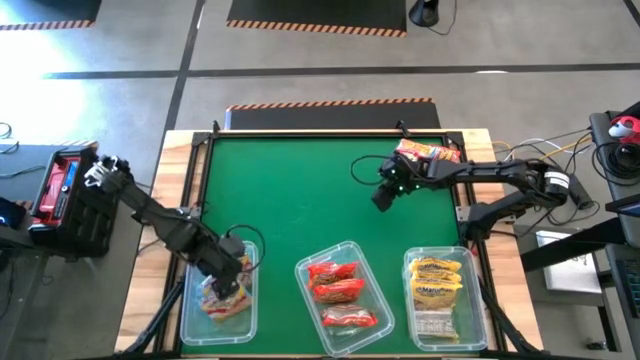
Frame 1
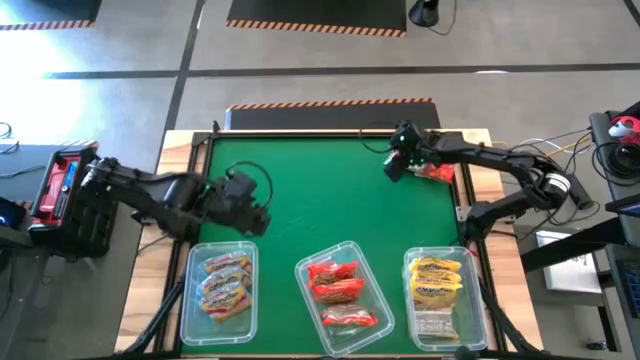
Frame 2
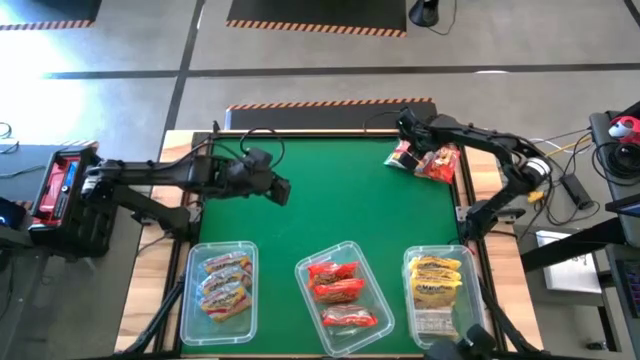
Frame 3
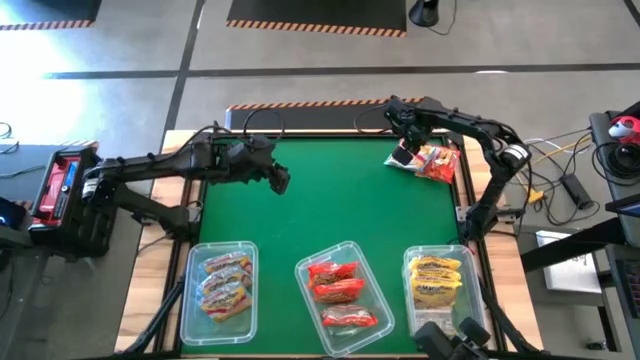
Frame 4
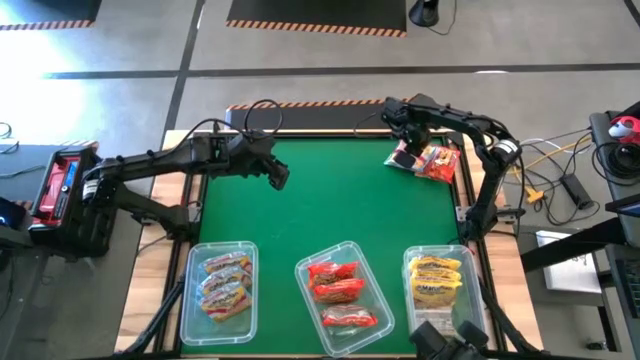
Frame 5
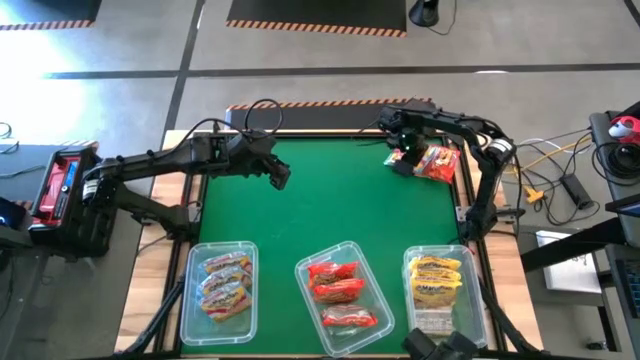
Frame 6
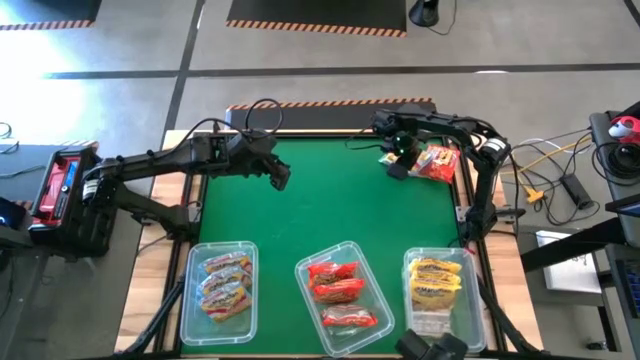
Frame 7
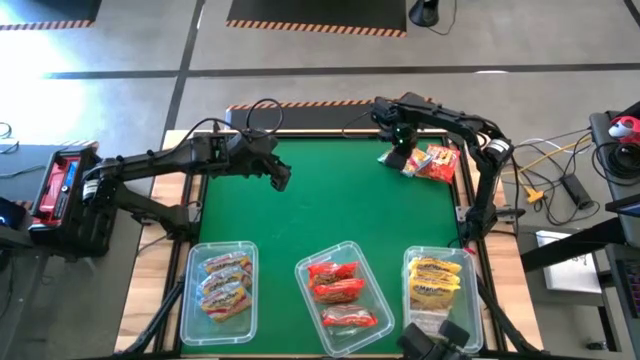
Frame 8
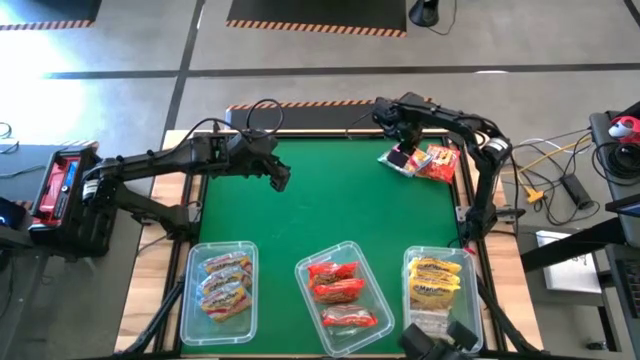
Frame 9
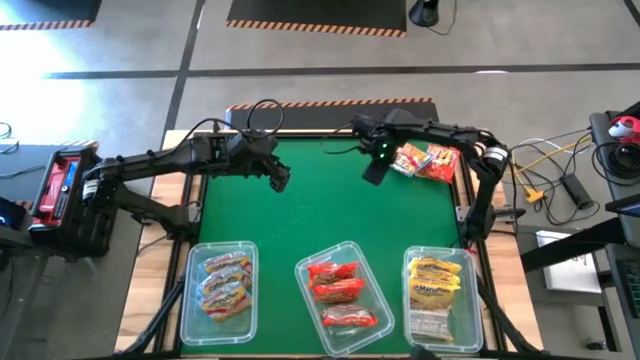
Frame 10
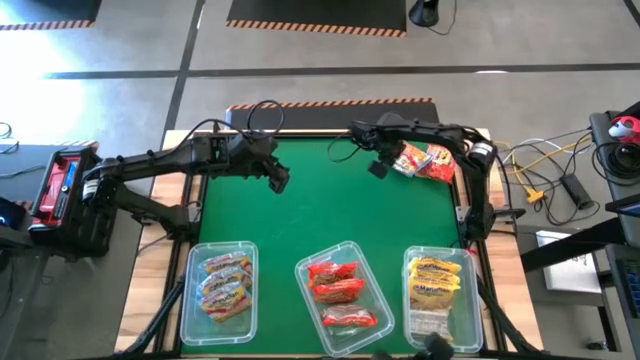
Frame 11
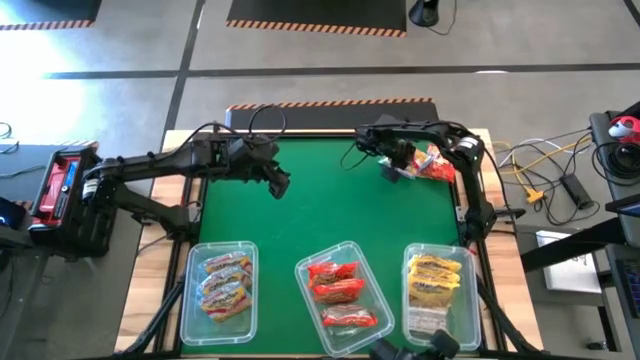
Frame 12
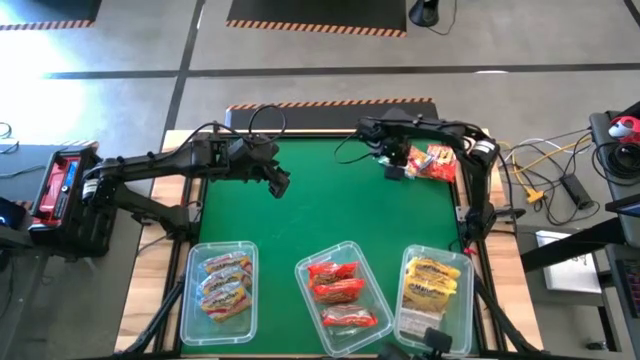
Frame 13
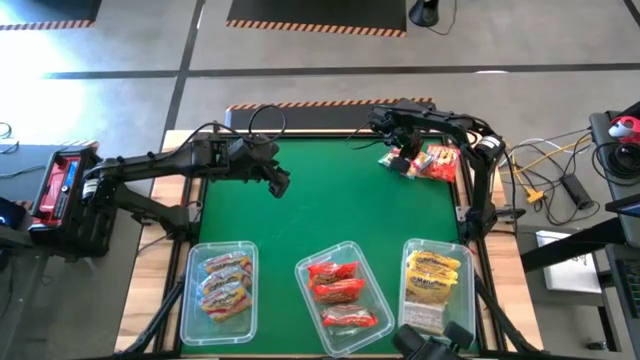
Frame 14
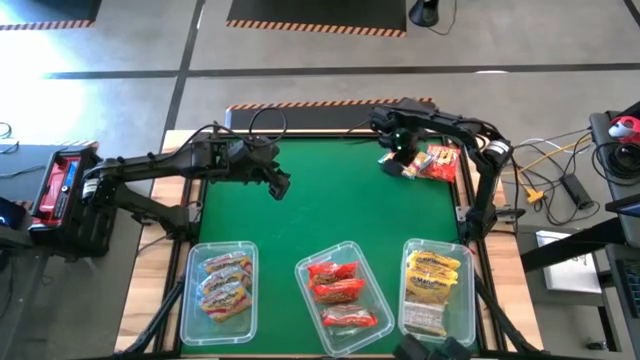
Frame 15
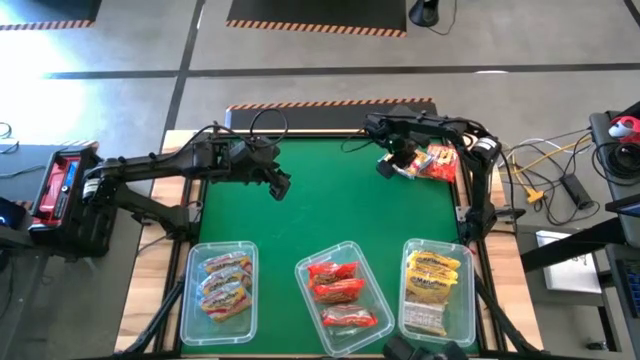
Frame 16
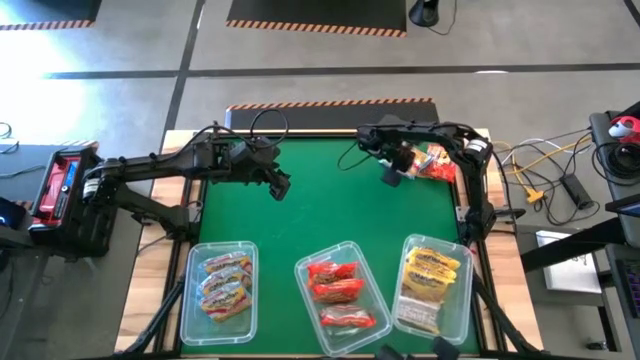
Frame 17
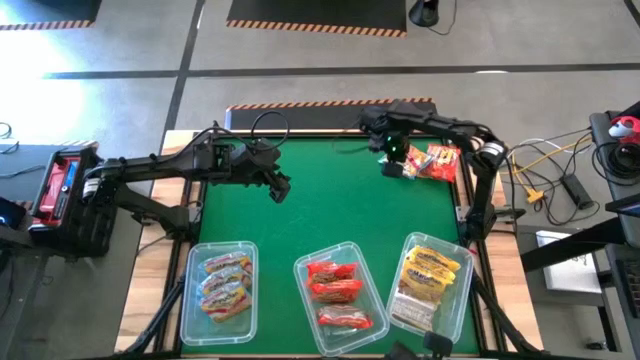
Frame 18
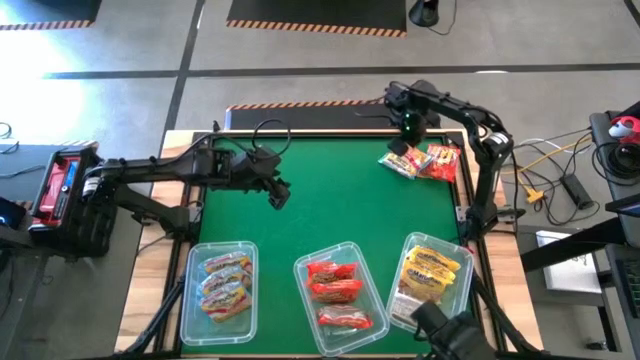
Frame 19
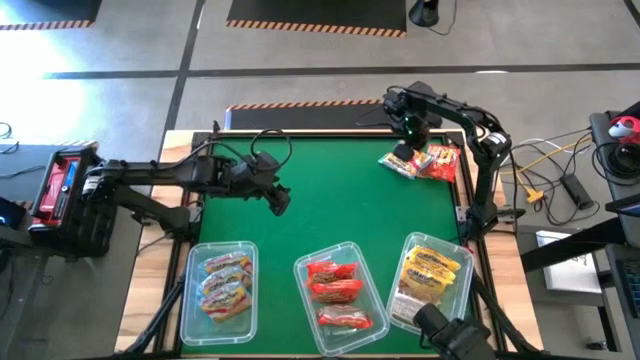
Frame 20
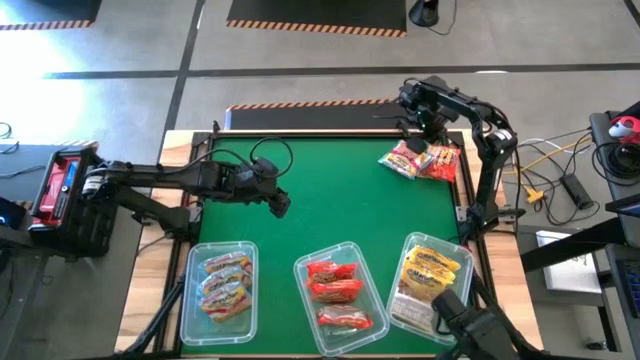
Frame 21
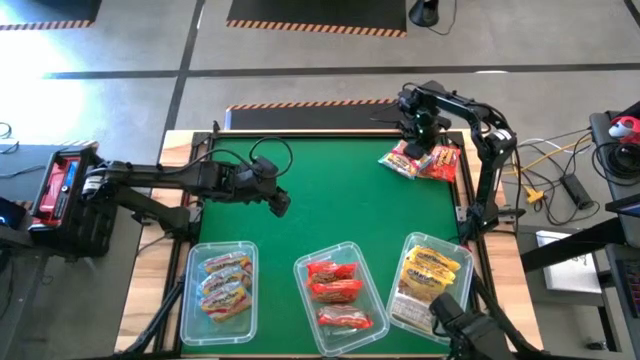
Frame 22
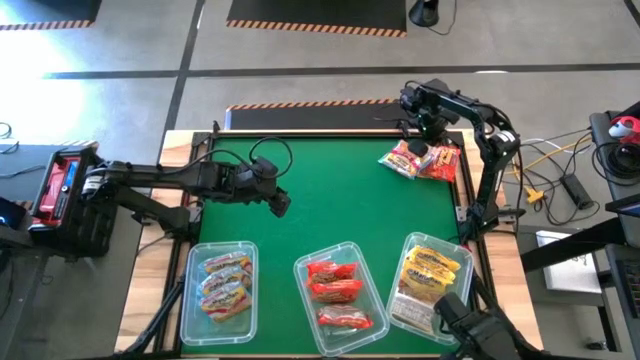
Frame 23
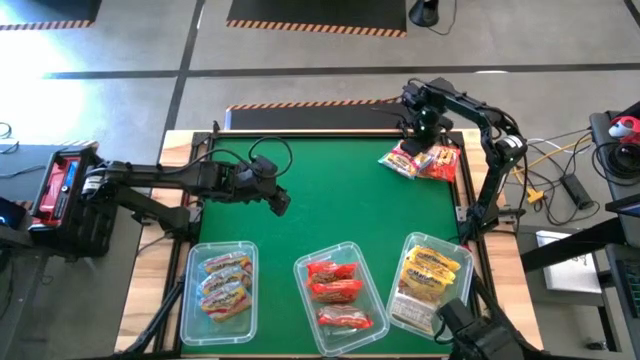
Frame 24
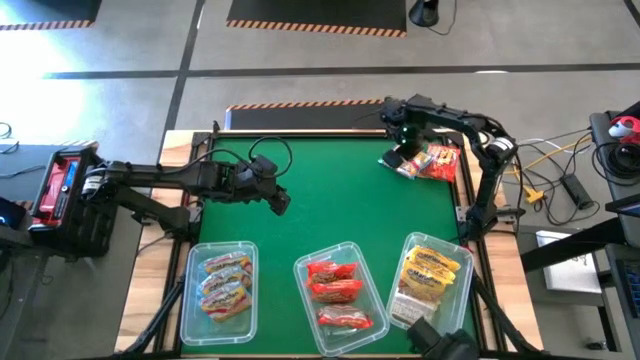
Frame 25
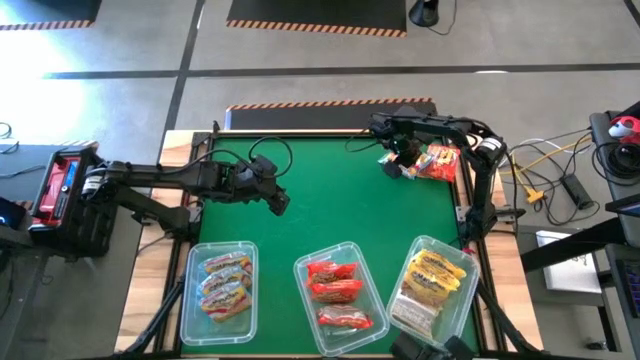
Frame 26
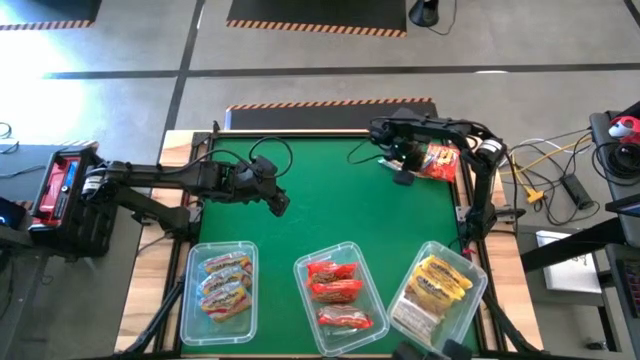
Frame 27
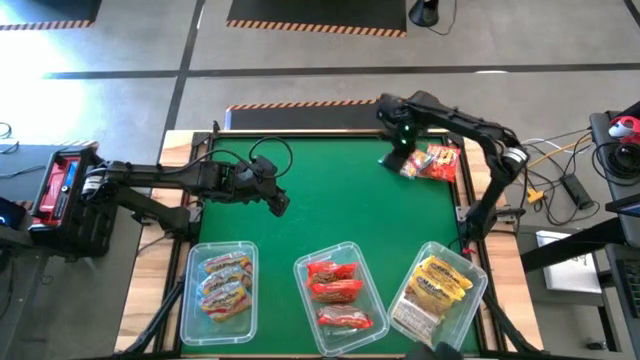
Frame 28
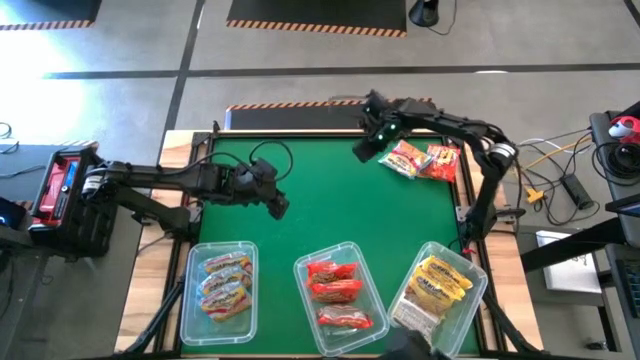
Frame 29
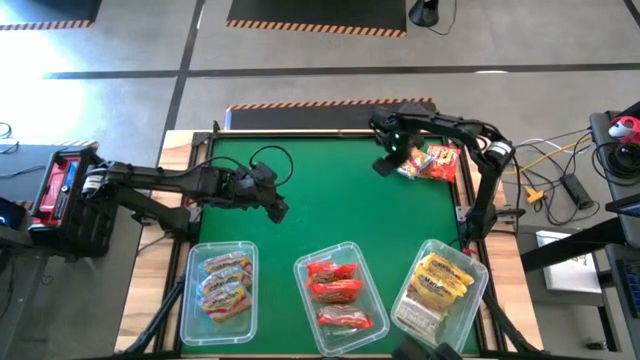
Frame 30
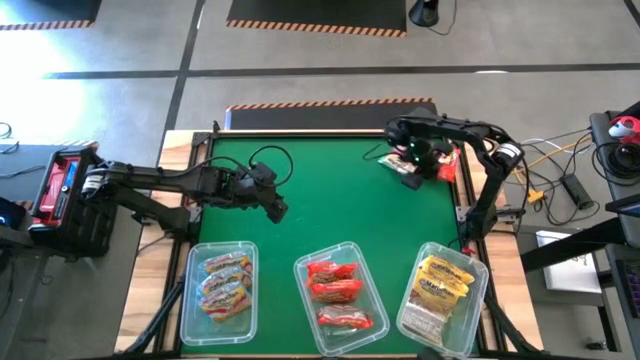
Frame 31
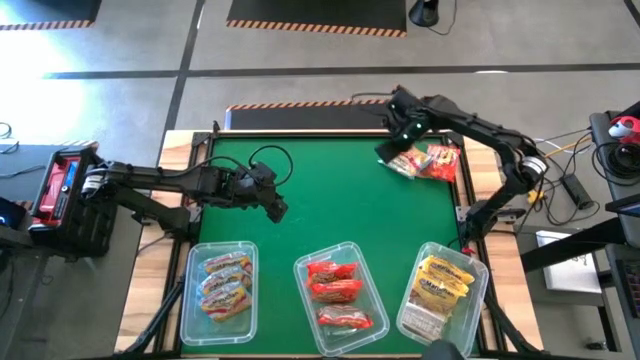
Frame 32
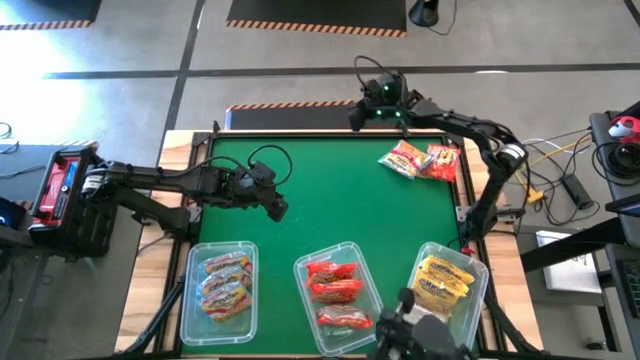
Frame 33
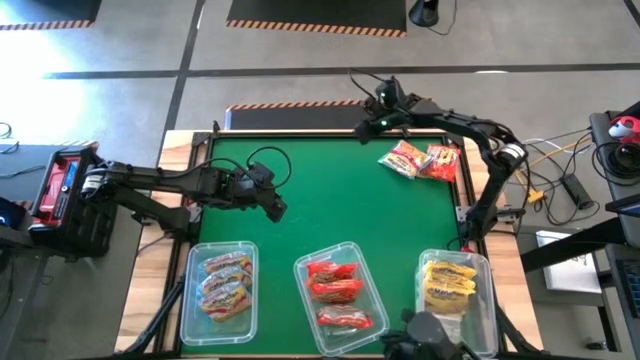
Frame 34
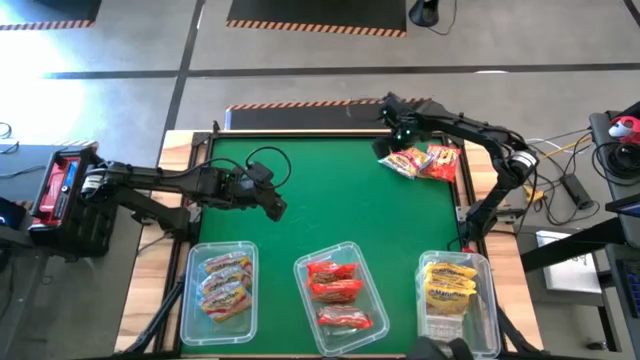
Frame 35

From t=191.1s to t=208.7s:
Task: Sort Maruchan noodles
Put the blue noodle pack into the left transparent bin

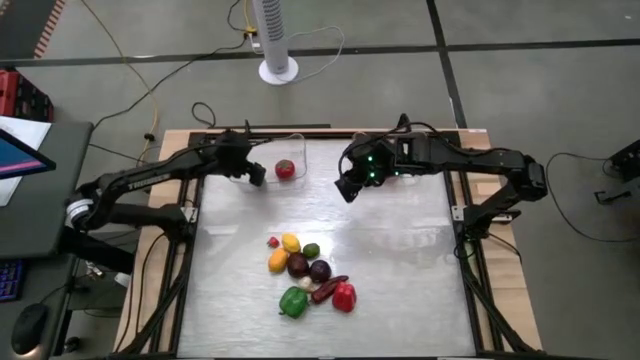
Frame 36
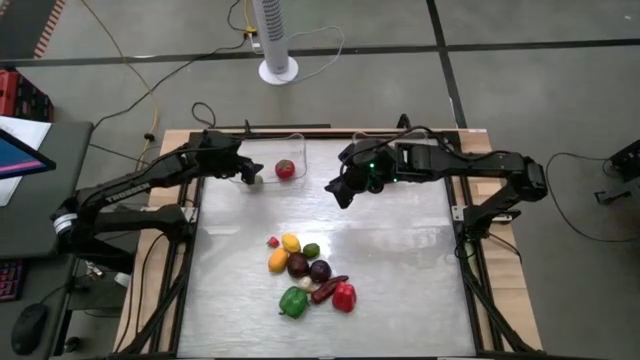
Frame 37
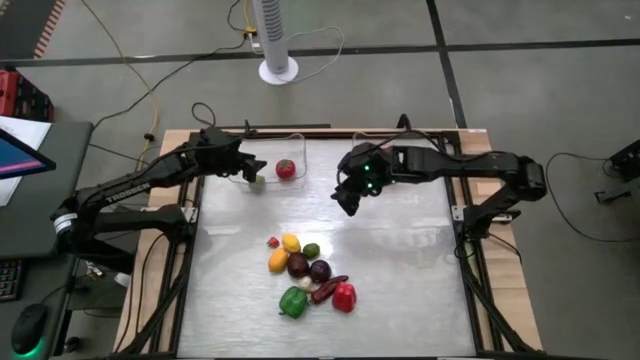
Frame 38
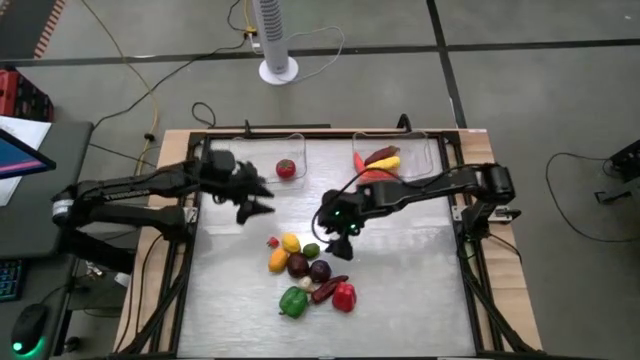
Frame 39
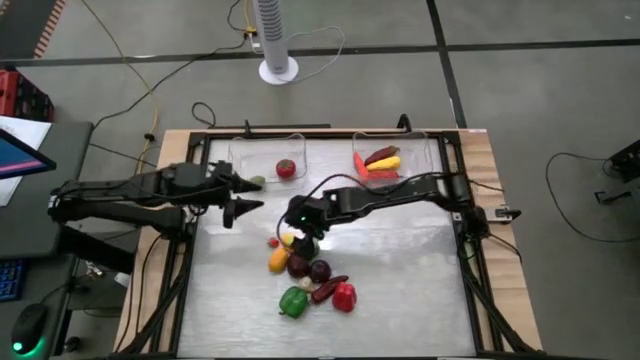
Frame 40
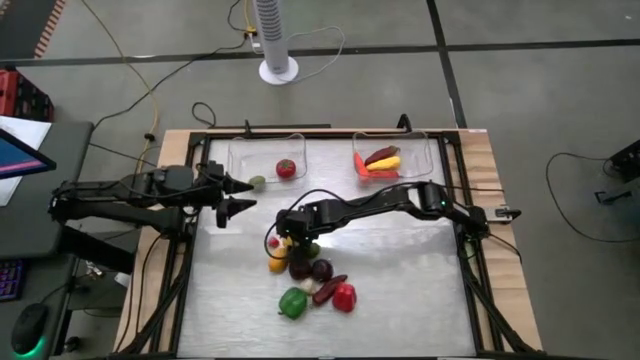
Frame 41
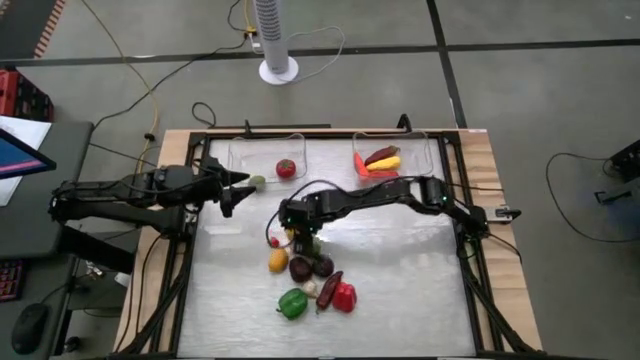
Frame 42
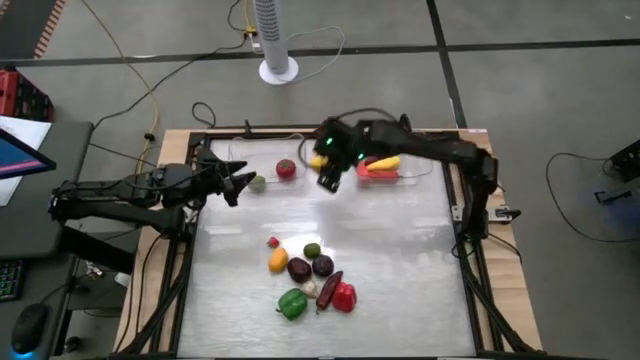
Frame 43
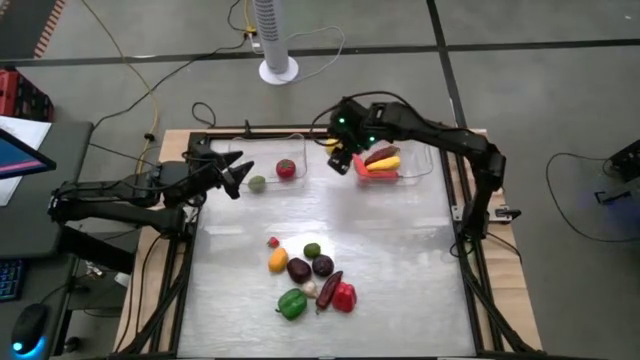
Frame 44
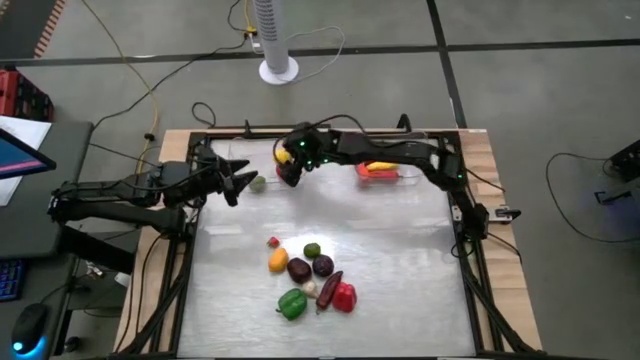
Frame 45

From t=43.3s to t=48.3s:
Task: Sort produce into baskets
Put the yellow lemon into the left transparent bin
